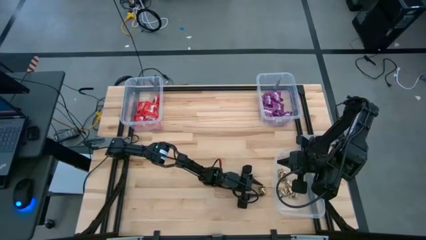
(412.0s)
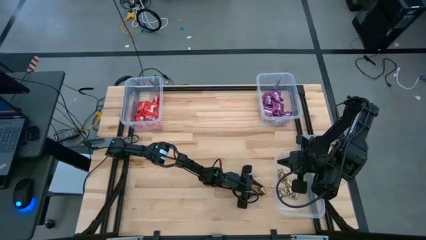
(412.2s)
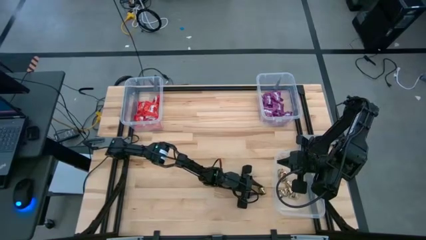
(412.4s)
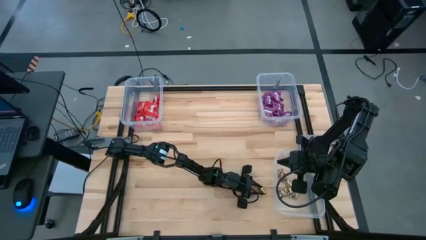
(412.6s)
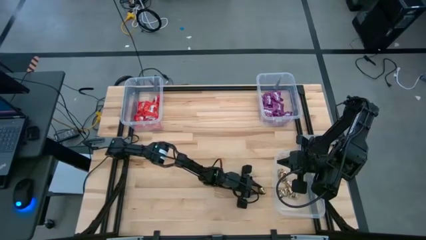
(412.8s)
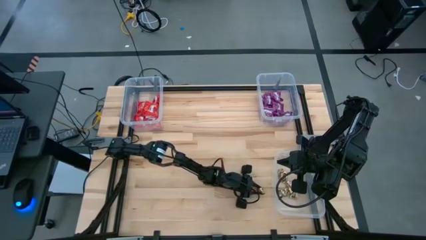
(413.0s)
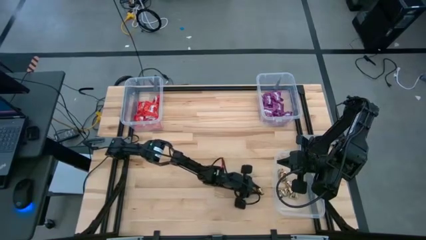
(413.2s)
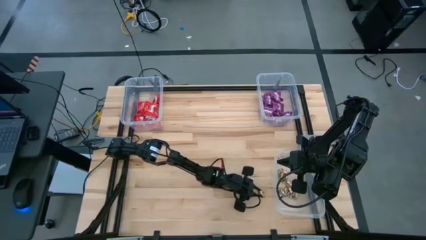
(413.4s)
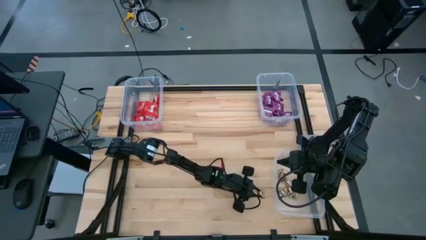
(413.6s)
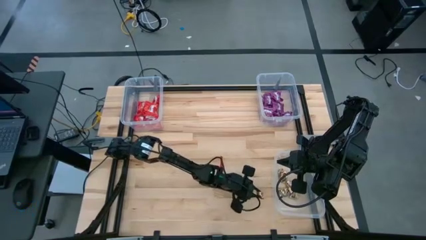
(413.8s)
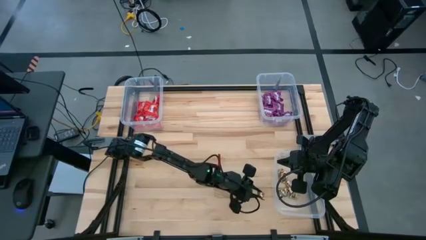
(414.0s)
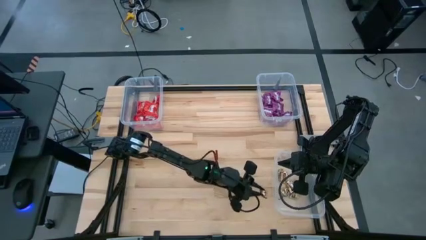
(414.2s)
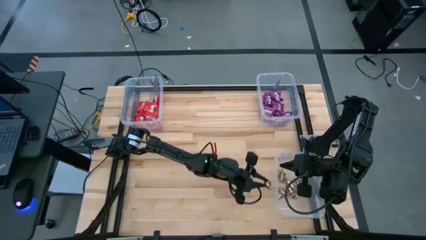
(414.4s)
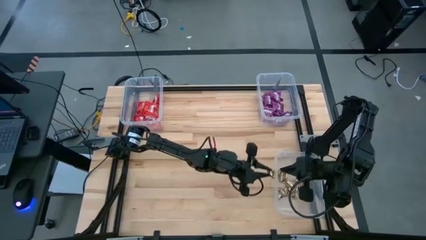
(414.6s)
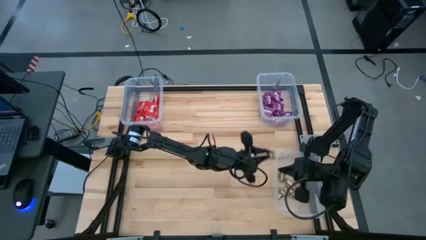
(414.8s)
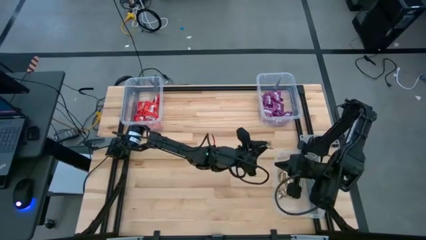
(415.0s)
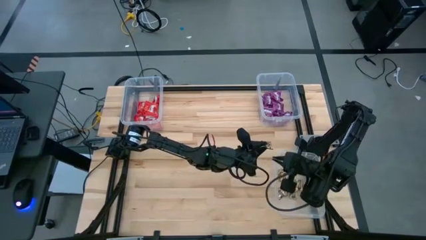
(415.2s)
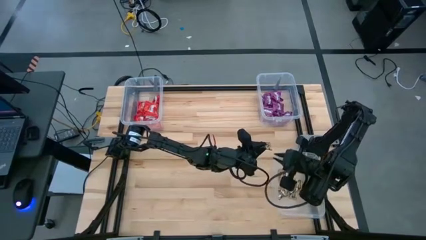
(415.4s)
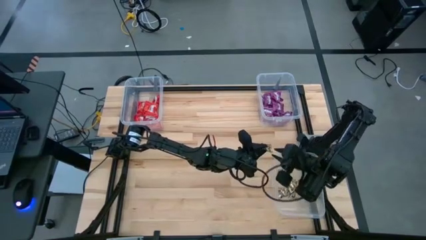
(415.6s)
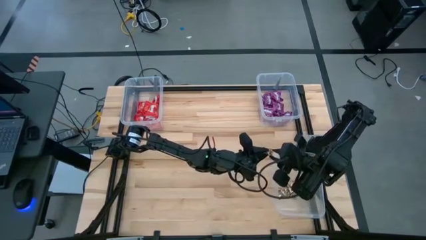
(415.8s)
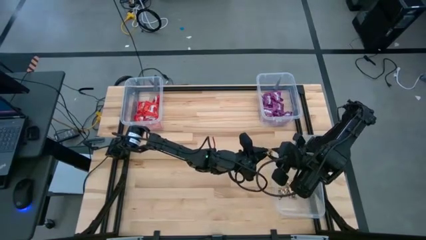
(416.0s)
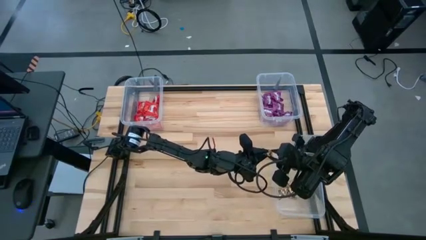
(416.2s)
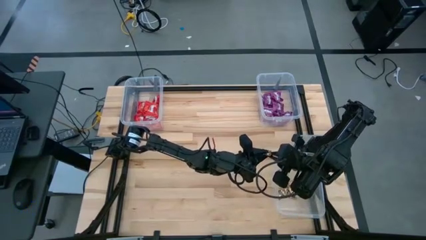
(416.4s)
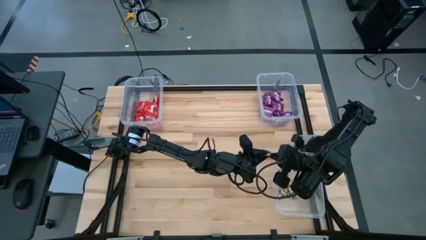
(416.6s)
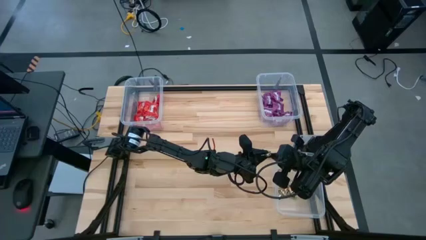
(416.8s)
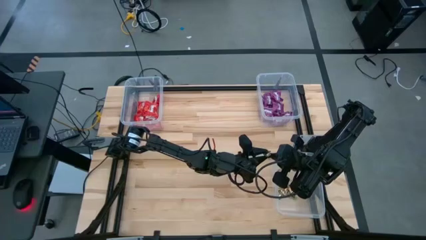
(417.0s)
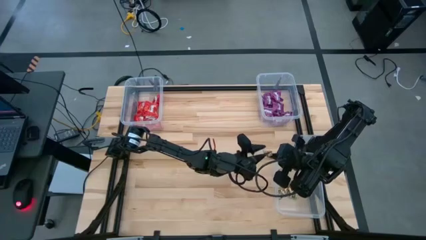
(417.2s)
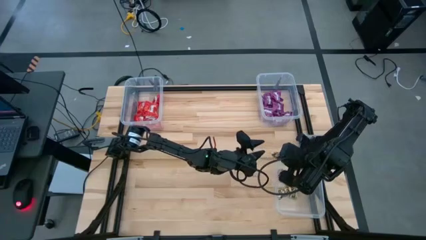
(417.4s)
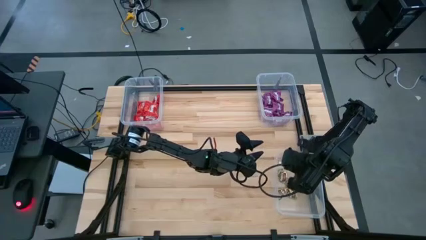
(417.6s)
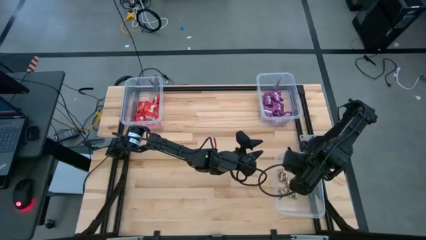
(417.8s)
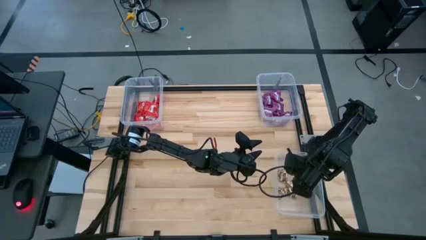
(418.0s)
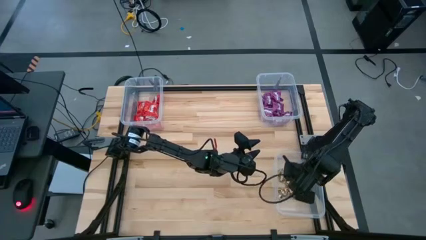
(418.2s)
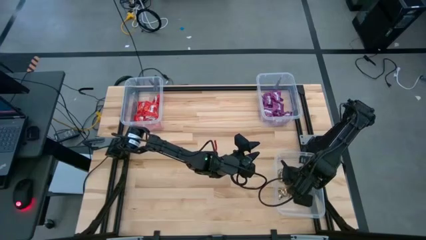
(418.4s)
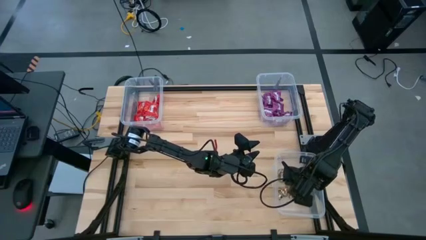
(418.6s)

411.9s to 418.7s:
Task: Sort candy
Put the yellow candy into the bottom right transparent bin

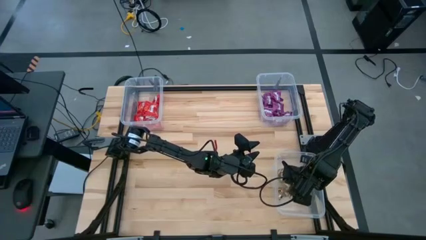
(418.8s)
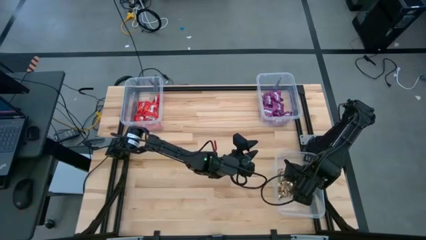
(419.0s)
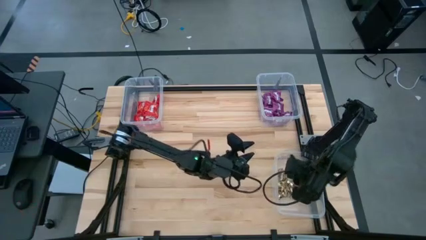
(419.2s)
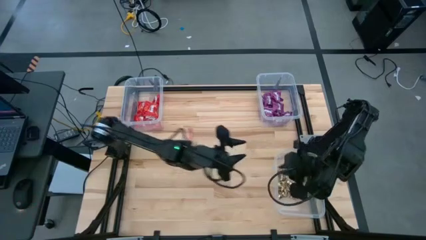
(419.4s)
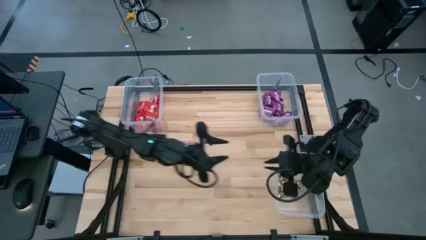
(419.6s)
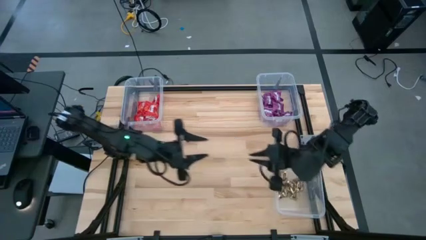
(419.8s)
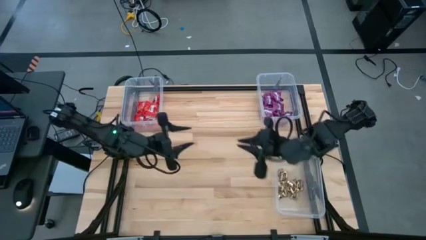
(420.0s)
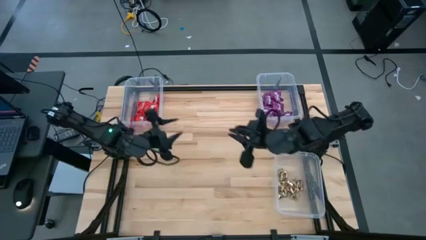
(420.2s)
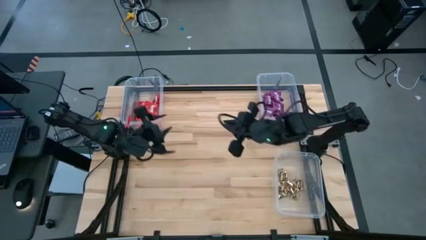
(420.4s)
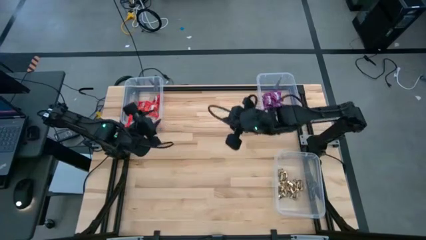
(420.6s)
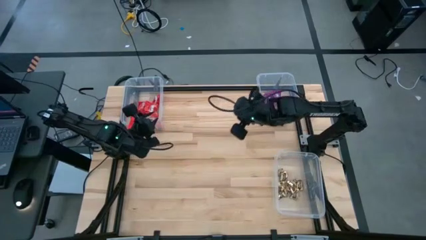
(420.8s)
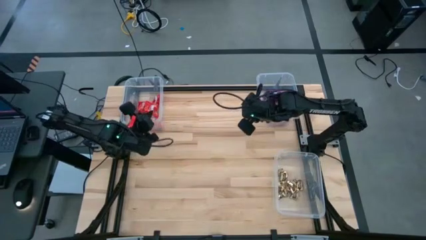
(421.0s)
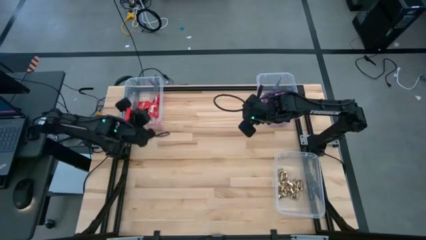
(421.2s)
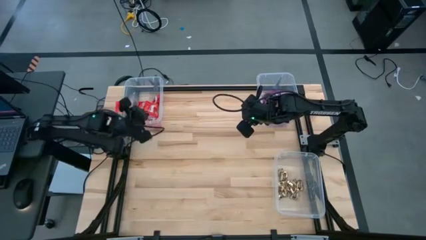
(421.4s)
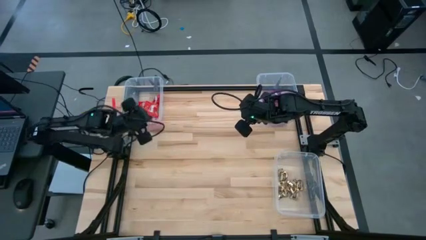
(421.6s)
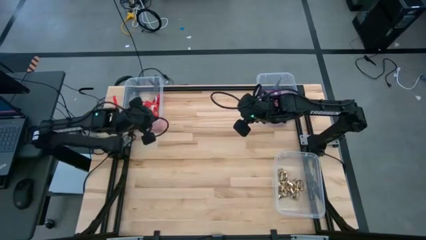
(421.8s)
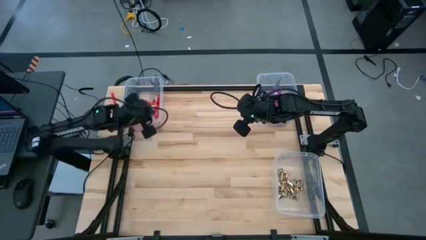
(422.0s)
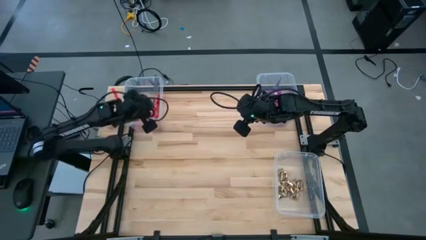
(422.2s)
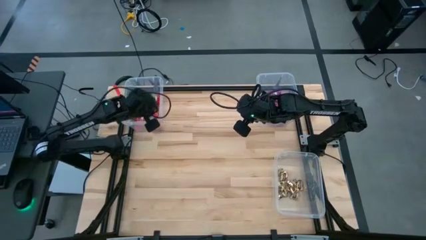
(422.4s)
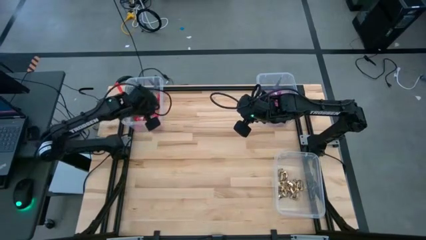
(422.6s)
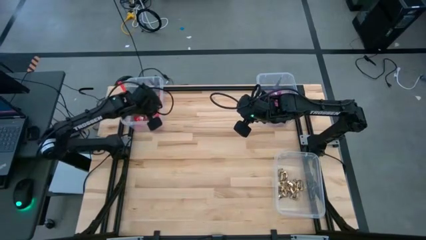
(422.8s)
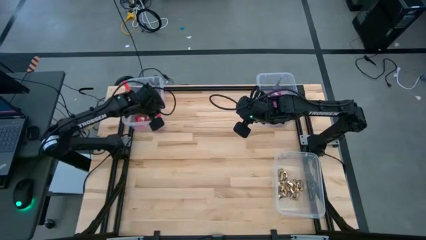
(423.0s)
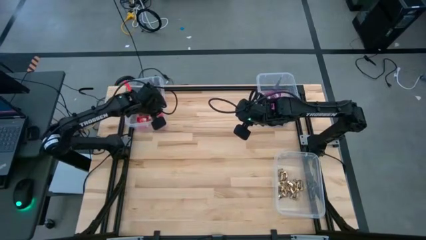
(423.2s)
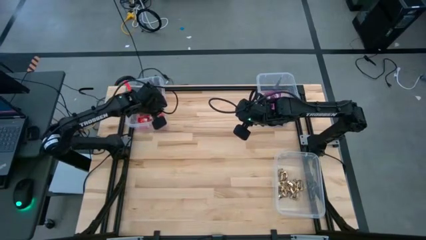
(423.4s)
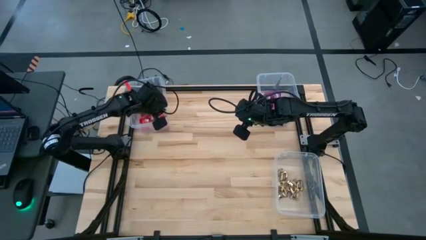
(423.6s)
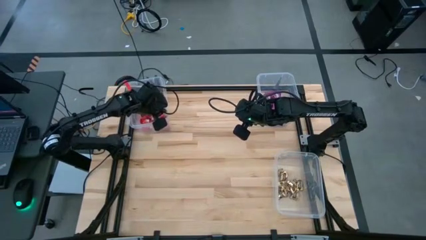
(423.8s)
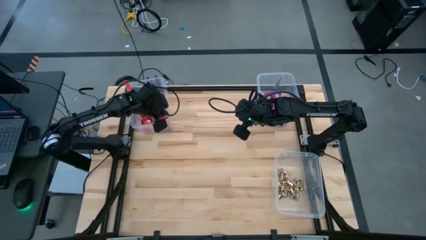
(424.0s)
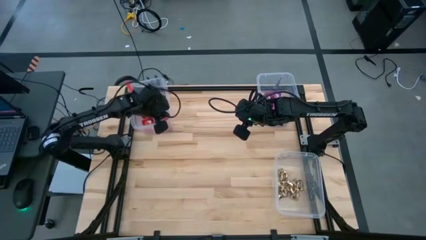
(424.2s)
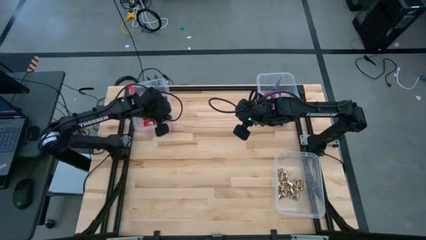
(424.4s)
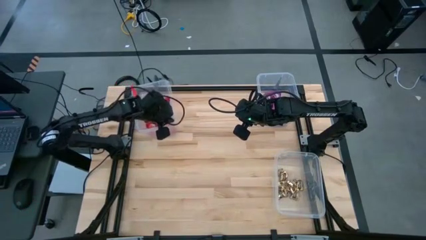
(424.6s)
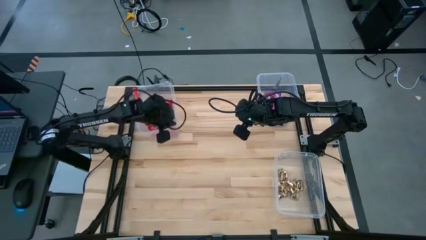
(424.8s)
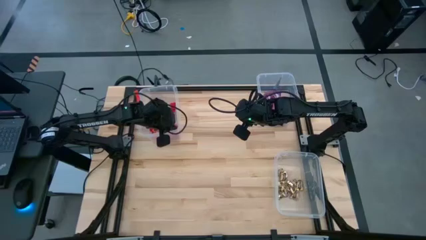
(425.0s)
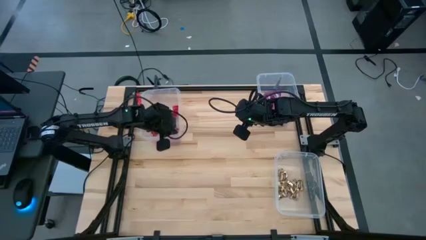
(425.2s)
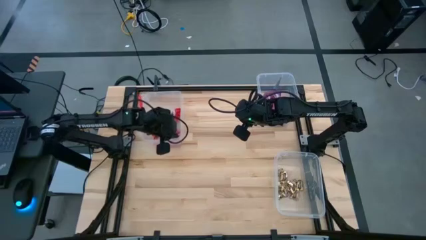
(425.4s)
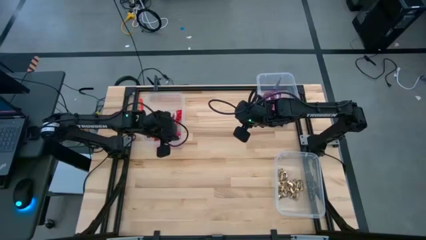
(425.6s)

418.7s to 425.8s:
Adjust the top left transparent bin

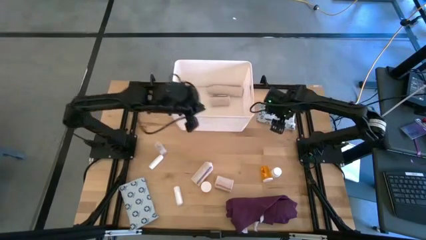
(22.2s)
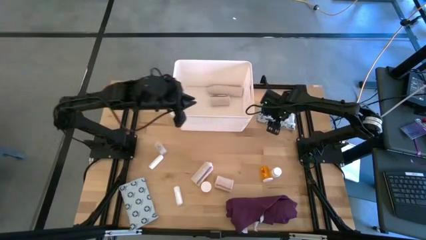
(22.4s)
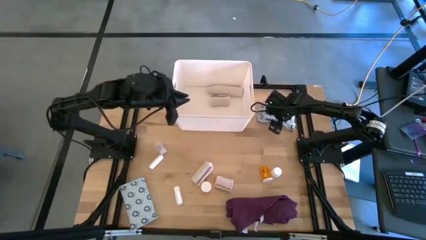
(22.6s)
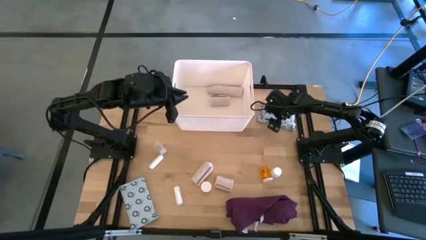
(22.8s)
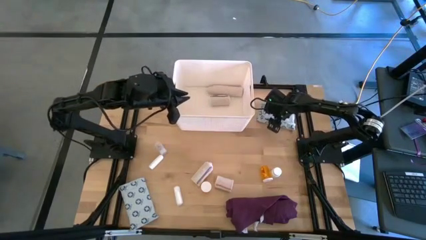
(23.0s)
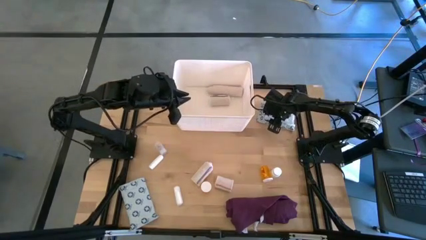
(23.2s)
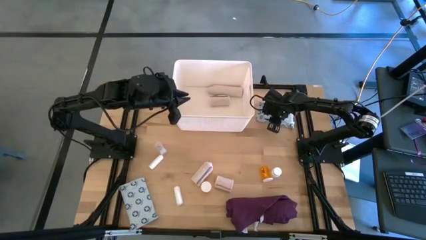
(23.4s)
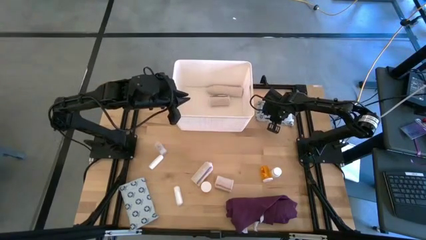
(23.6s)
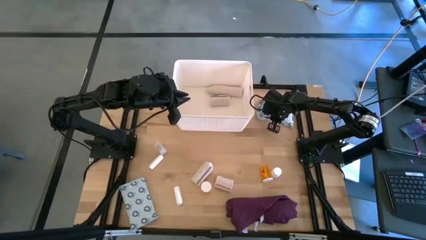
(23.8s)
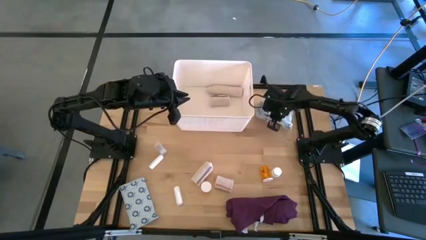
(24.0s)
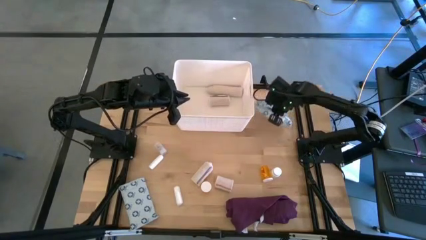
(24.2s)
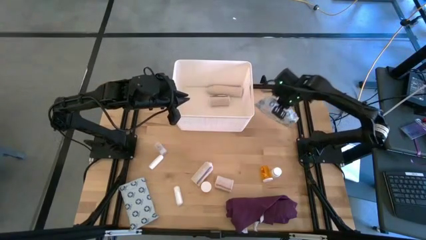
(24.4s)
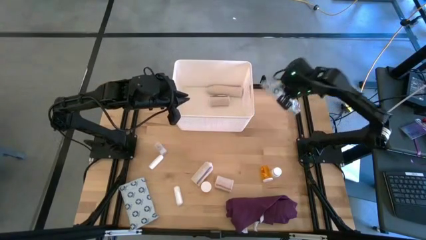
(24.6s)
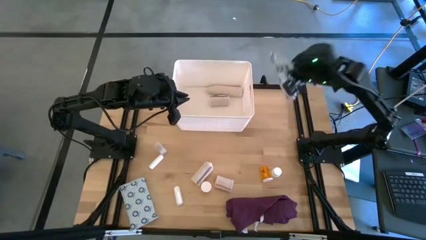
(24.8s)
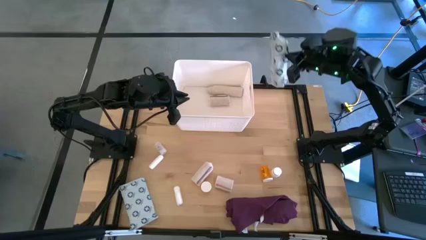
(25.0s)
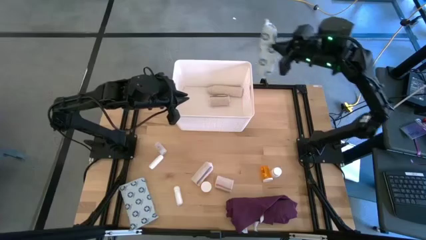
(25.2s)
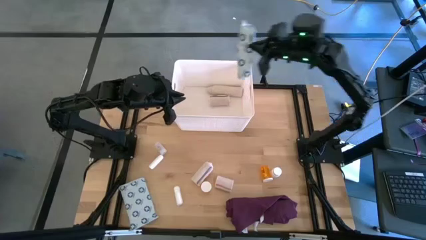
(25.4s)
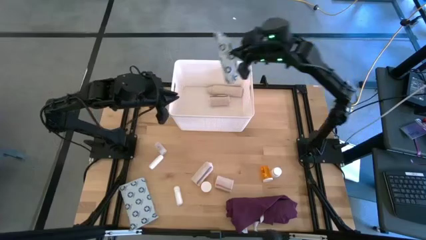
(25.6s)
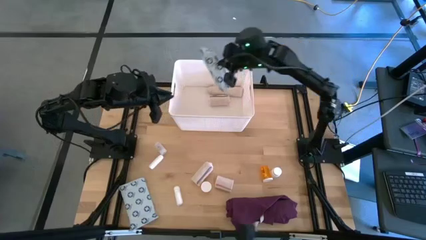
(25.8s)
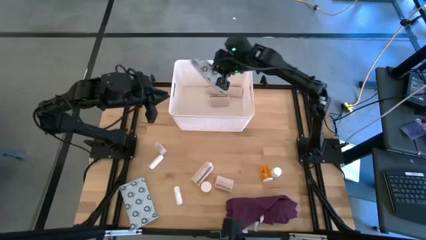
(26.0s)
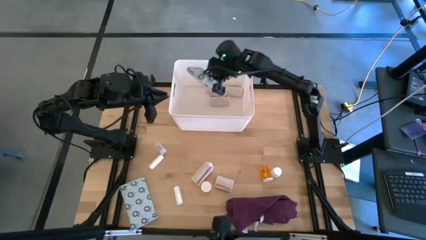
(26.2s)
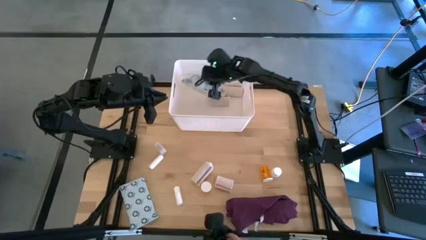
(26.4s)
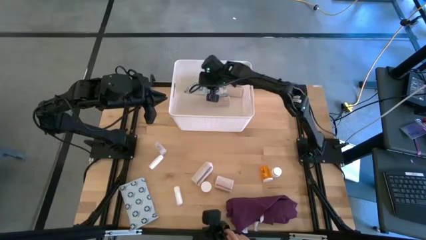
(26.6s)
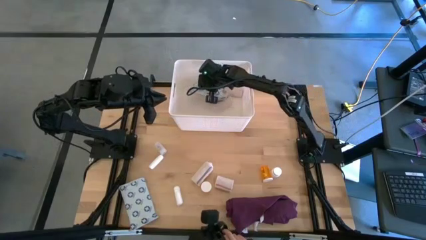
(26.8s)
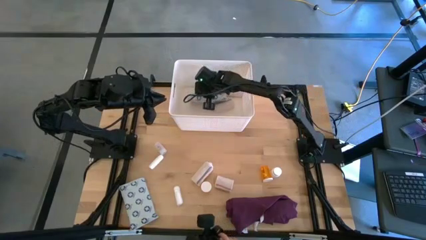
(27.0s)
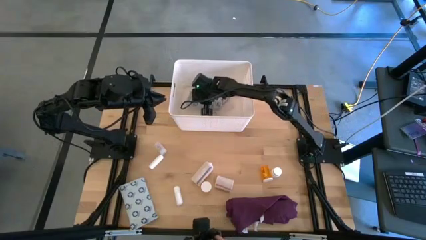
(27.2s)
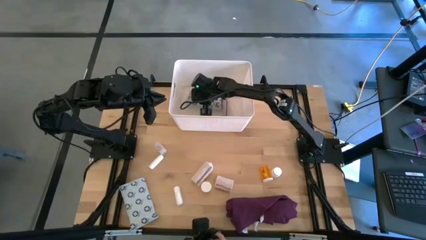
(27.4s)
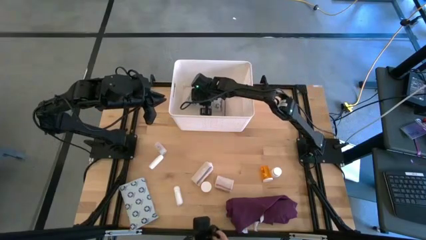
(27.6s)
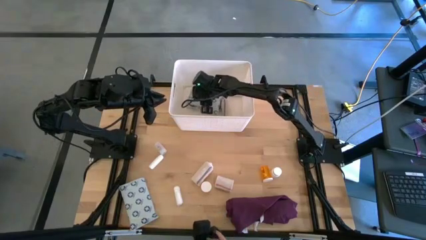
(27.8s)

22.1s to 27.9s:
Task: Pick & place medical supplies in basket/bin
Put the top white mailer bag into the white bin
